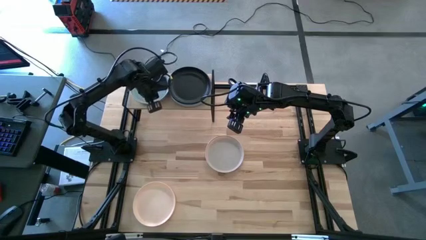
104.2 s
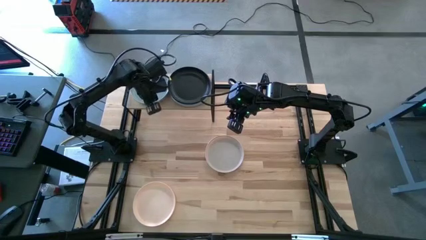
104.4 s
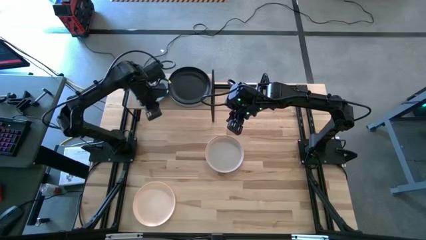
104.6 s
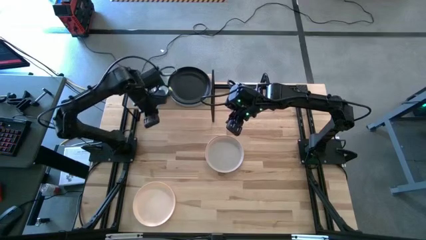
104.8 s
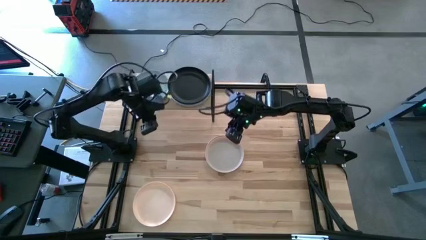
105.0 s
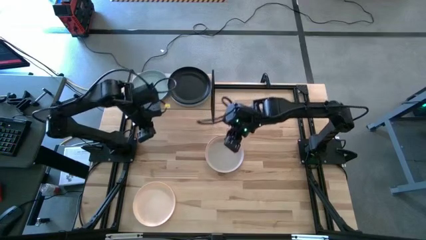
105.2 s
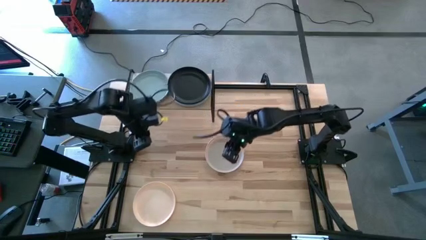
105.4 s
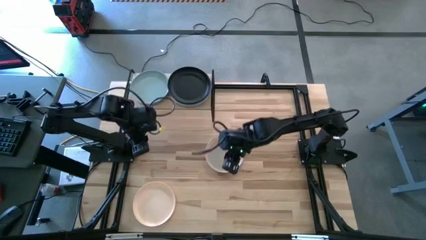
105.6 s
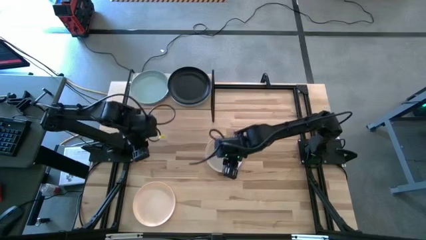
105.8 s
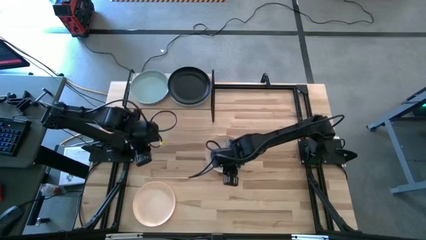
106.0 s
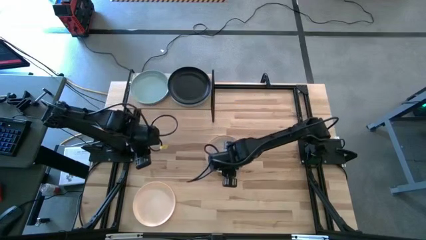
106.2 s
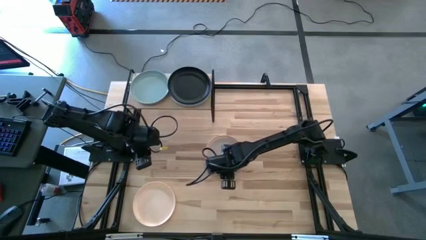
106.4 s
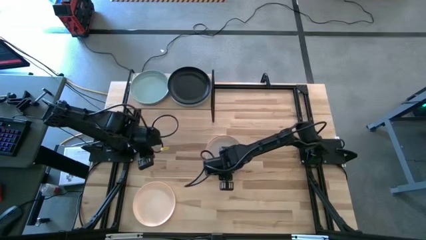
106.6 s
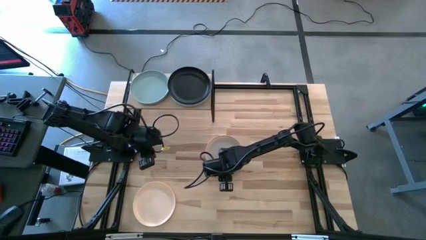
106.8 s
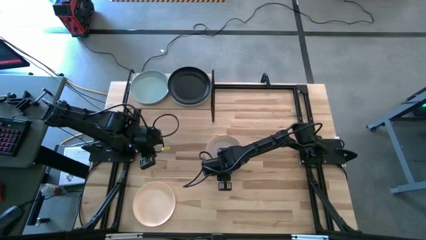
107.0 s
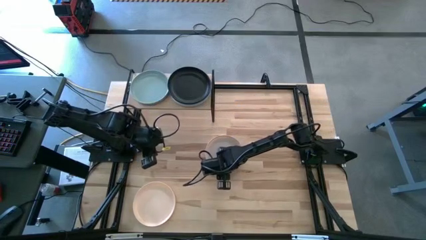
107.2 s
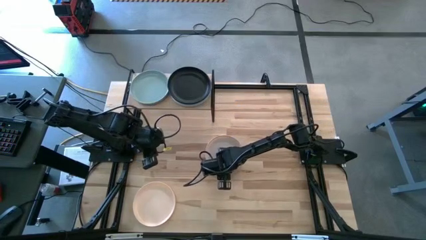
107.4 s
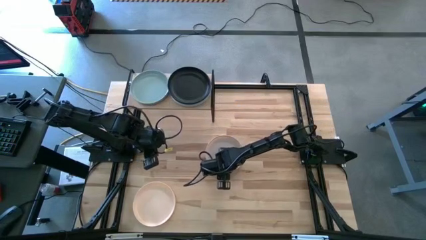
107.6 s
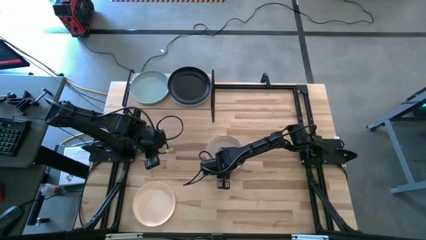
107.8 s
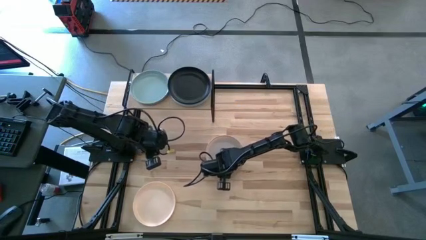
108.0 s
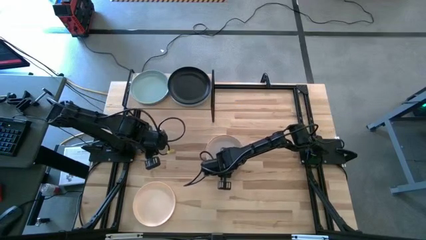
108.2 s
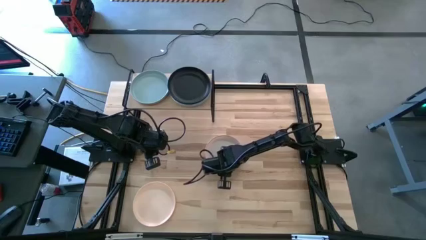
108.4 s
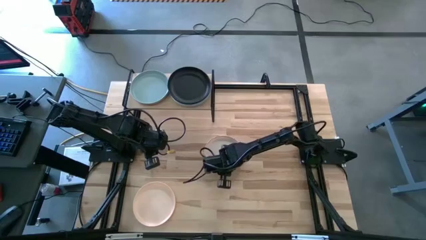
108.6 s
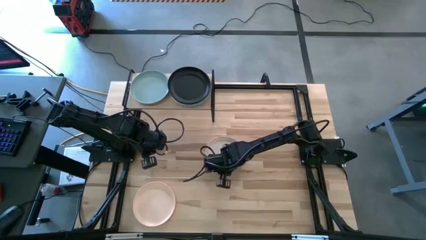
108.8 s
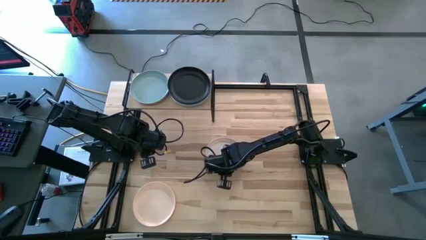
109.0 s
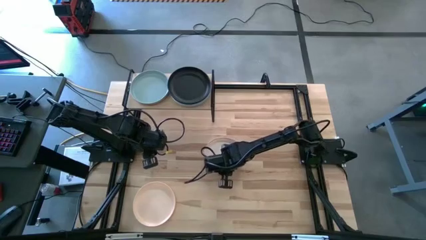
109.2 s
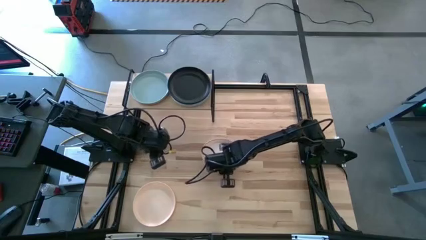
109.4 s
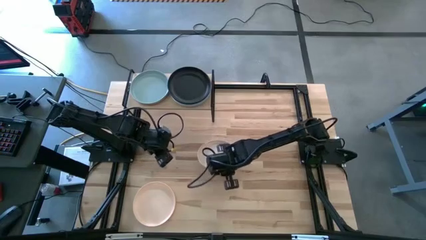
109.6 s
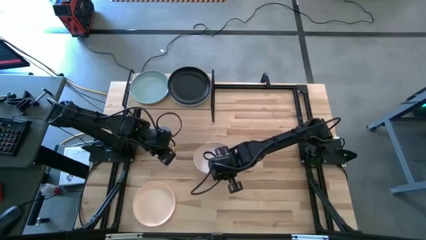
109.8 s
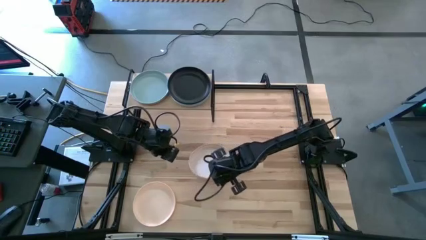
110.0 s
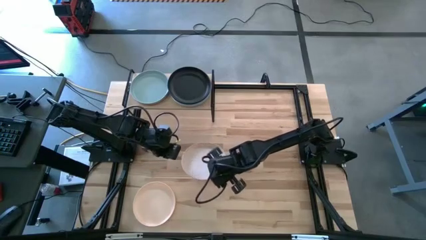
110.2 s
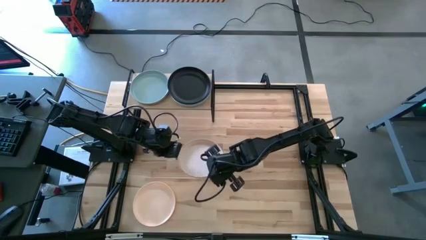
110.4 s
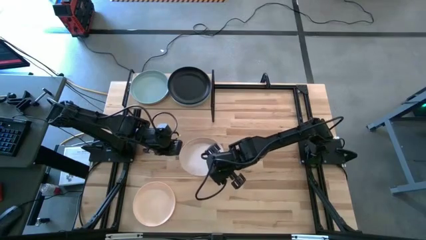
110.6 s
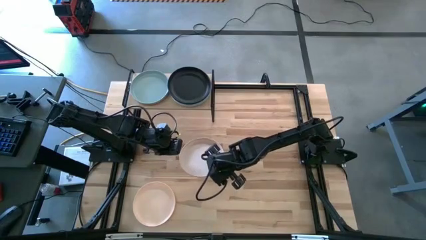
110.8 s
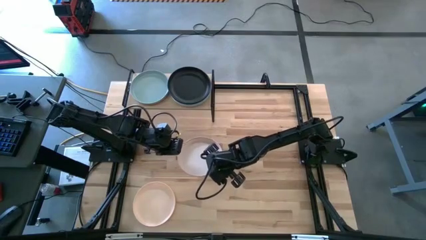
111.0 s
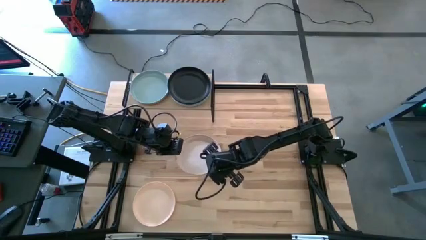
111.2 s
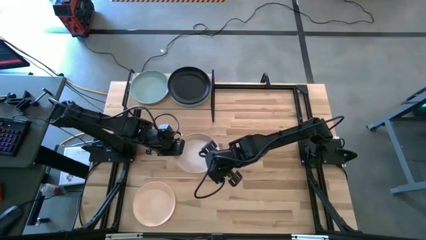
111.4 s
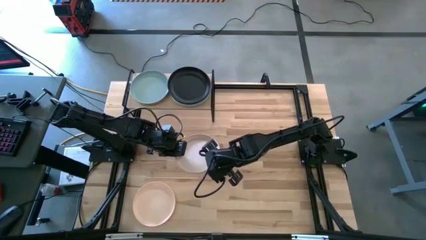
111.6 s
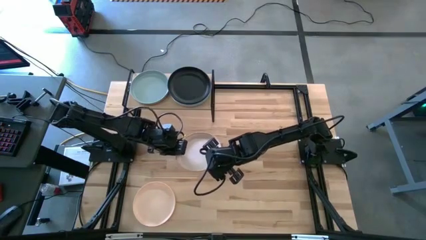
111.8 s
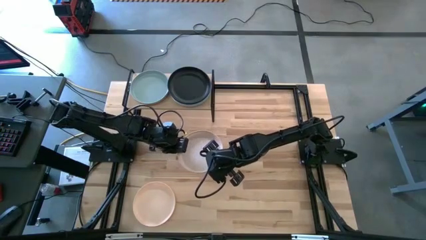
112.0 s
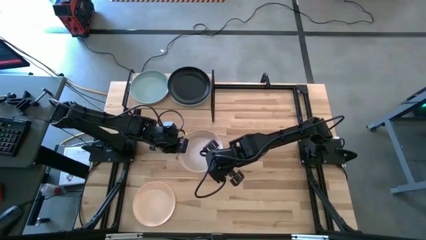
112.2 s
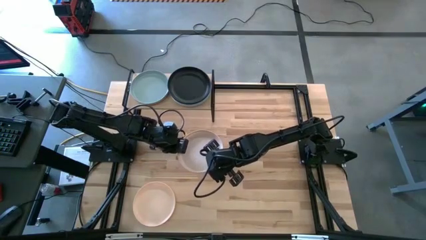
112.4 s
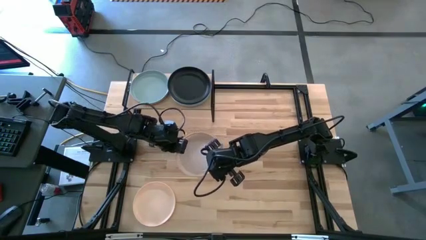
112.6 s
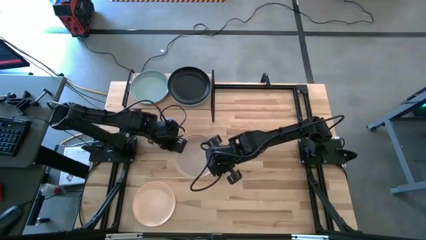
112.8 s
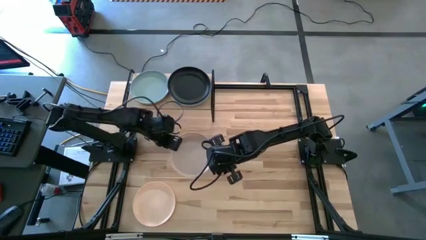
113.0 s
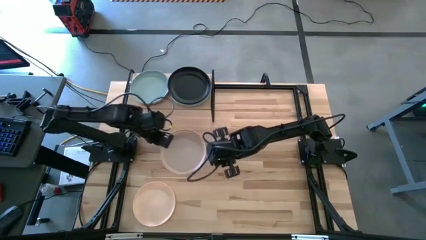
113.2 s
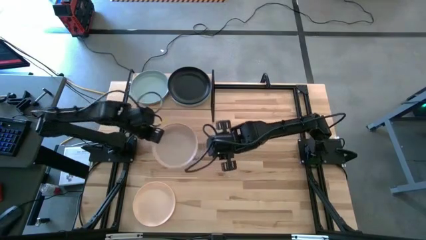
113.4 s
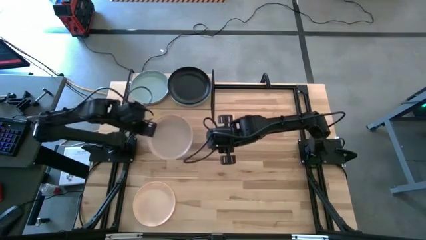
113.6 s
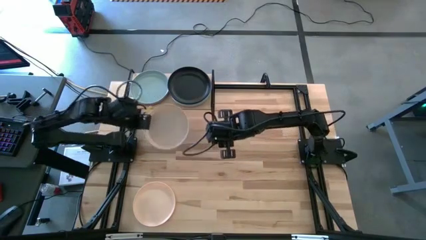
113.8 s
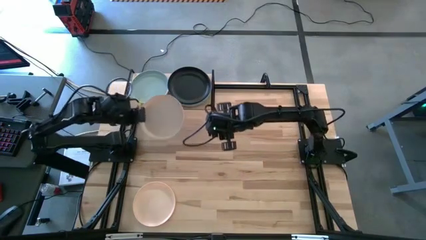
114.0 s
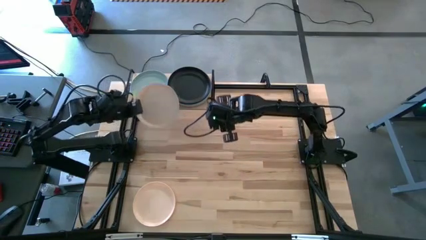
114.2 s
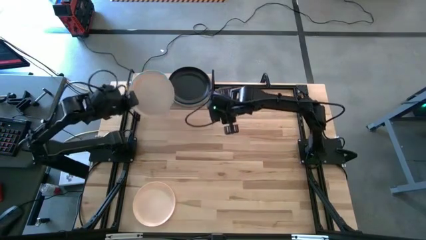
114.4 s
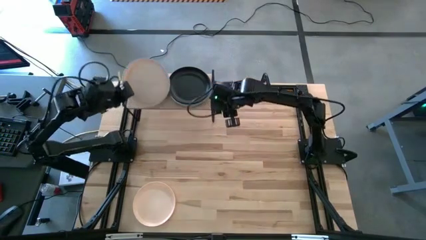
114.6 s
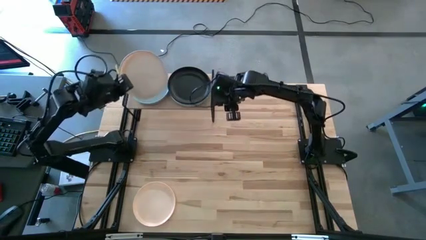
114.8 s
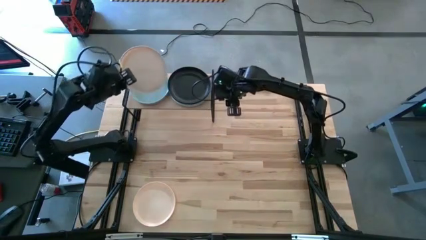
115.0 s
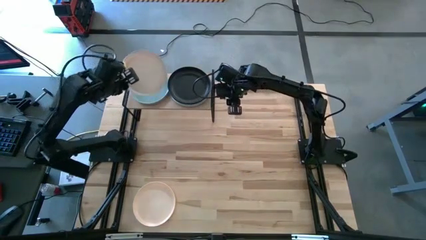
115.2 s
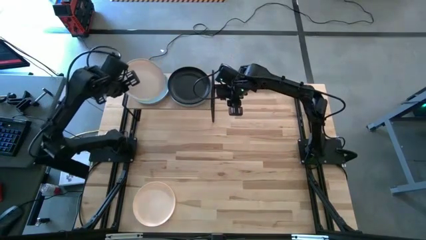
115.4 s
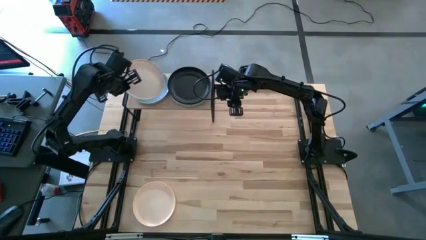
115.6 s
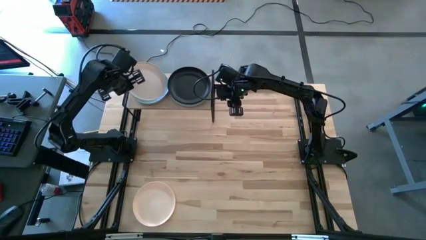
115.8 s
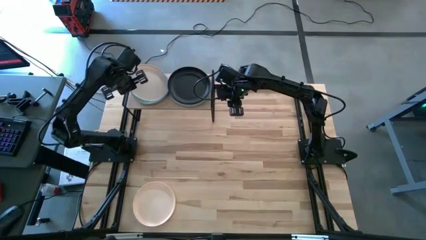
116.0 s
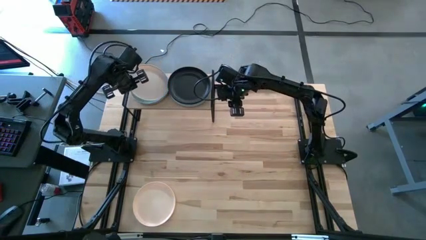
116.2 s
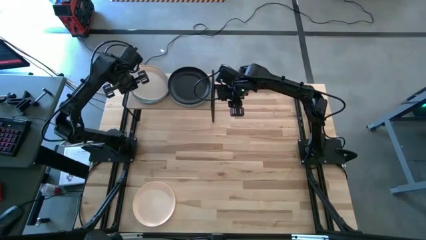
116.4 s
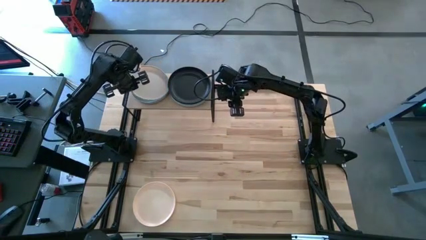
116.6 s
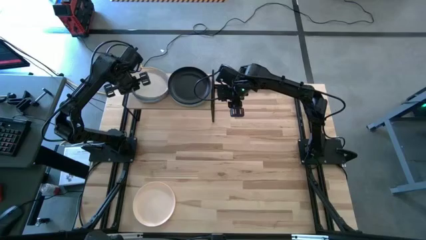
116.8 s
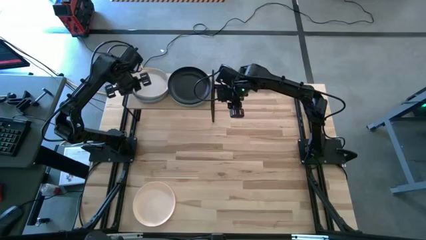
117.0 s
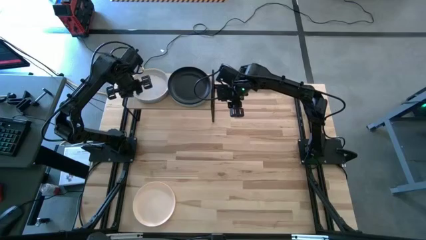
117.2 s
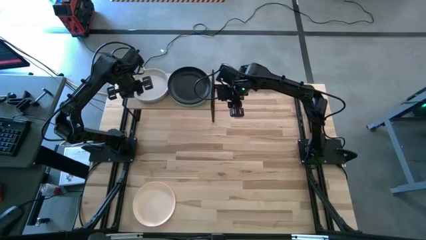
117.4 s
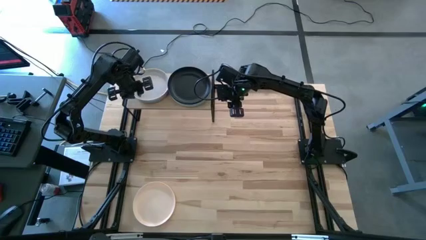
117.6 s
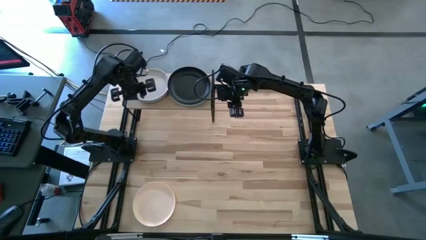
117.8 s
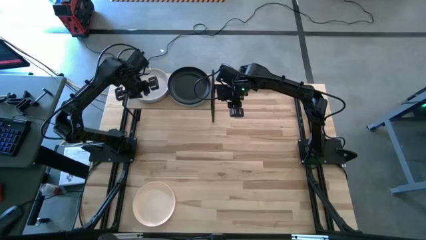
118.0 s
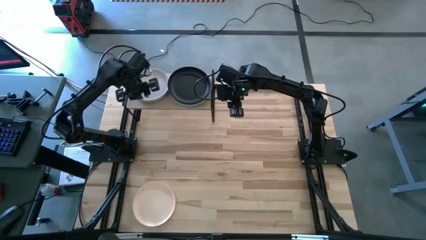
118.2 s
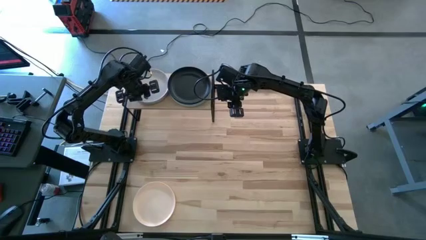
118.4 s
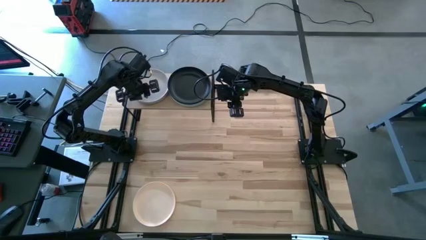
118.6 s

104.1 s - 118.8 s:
Task: Place and stack plates onto a shelf
Stack the light brown plate on top of the light blue plate on the shelf

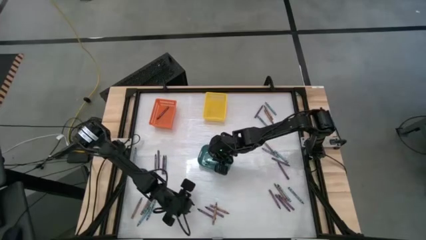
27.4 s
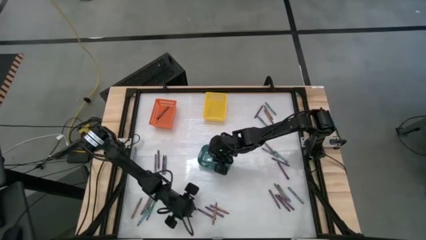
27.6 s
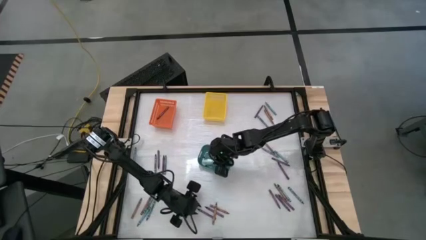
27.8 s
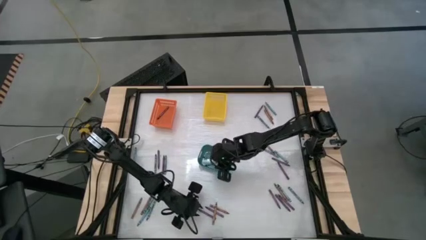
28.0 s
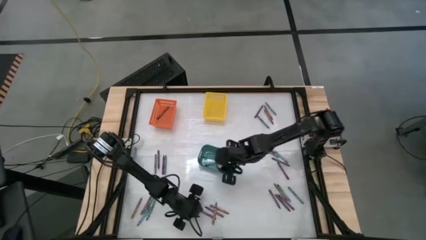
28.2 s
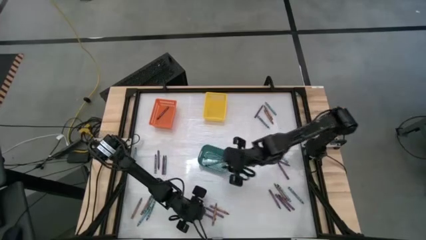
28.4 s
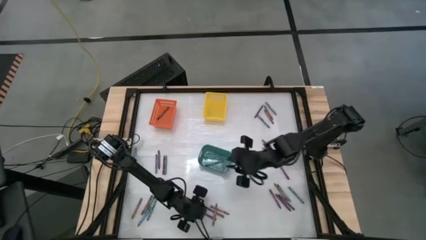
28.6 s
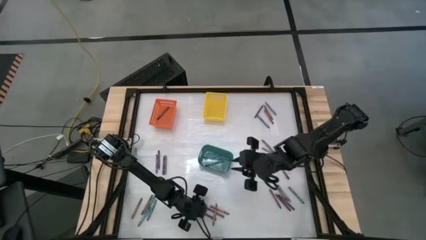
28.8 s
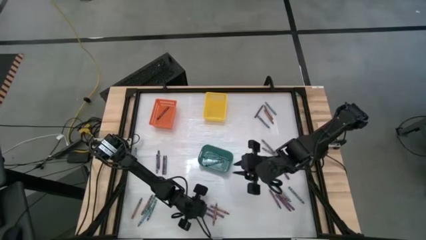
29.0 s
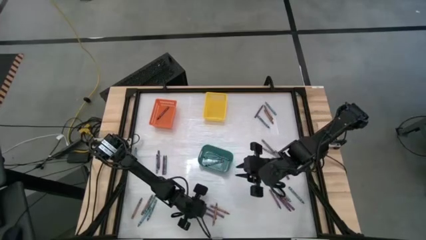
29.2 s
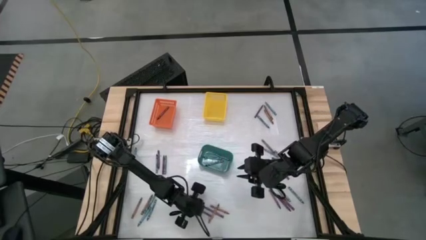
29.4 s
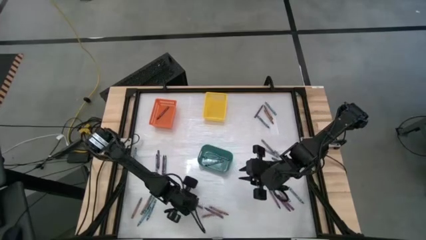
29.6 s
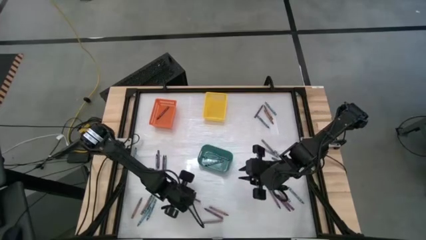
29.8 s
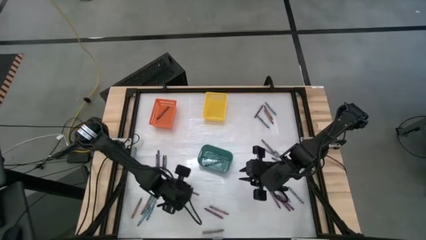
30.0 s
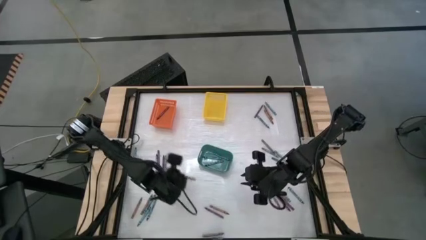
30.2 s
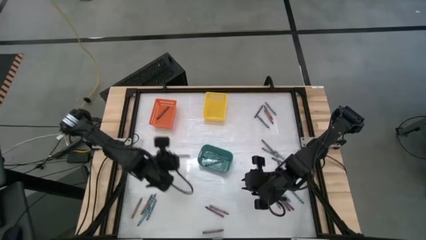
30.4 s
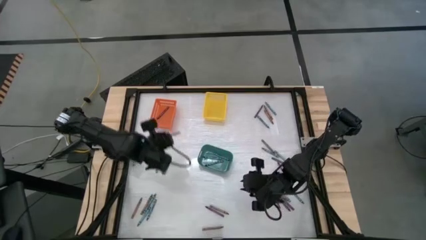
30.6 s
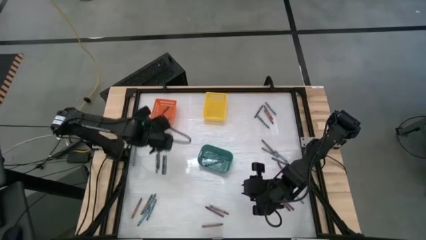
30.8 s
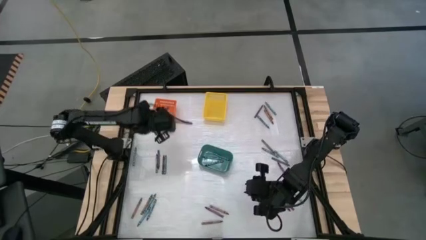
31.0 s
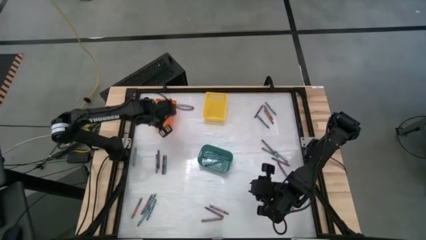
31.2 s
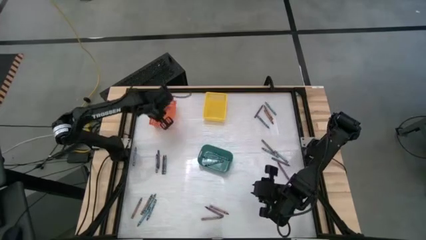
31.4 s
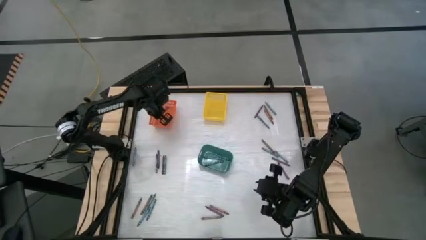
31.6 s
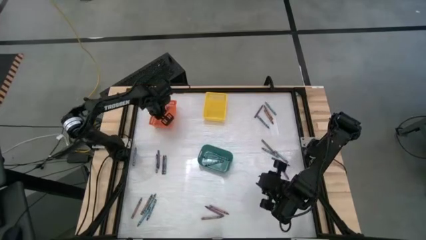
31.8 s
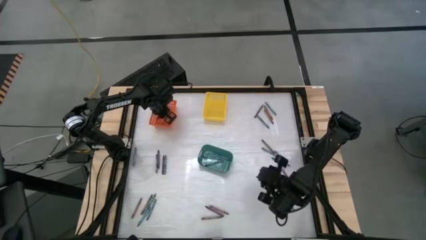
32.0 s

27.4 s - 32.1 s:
Task: Sort crayons
Put the violet crayon into the orange bin
